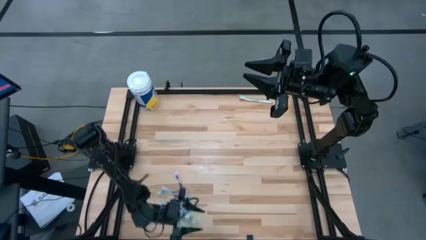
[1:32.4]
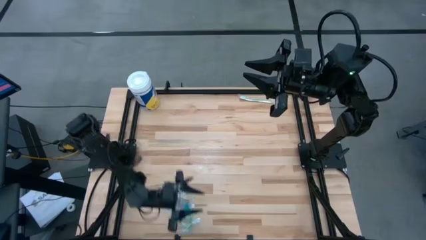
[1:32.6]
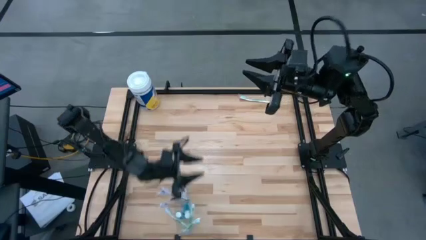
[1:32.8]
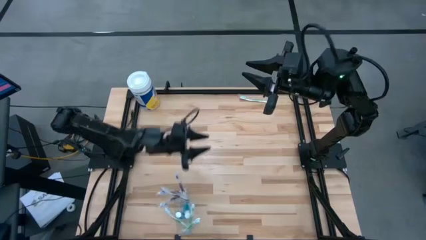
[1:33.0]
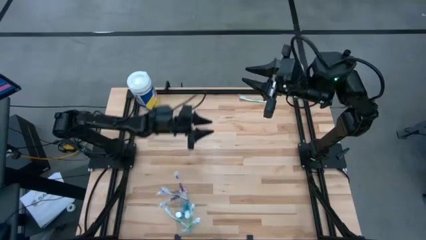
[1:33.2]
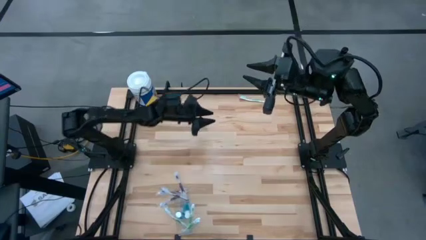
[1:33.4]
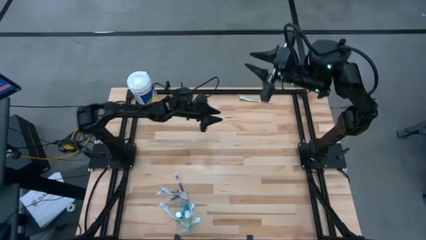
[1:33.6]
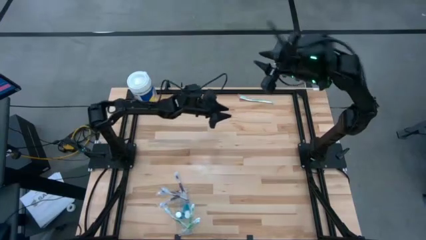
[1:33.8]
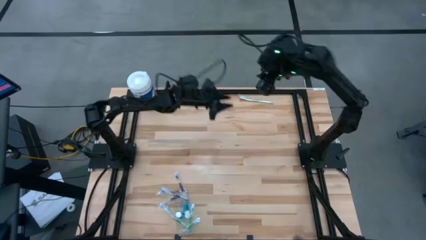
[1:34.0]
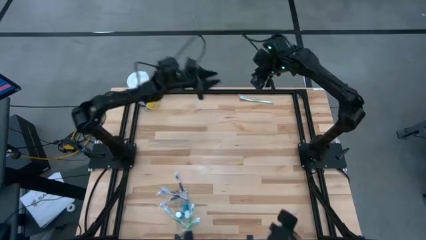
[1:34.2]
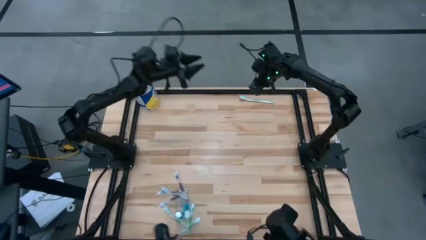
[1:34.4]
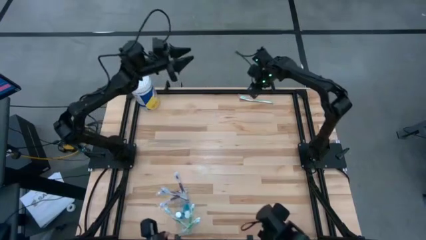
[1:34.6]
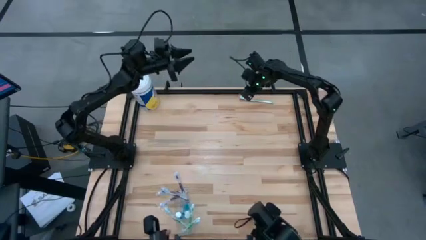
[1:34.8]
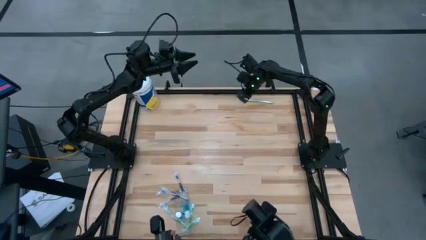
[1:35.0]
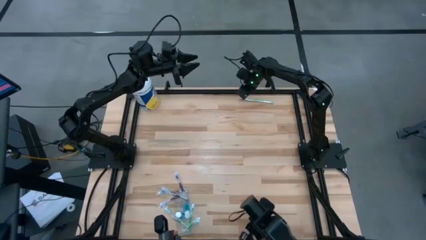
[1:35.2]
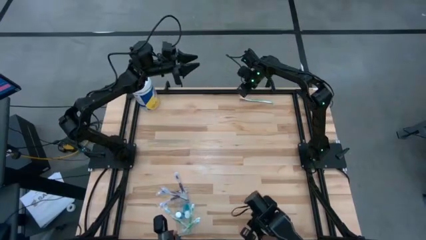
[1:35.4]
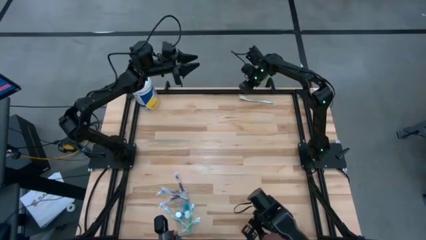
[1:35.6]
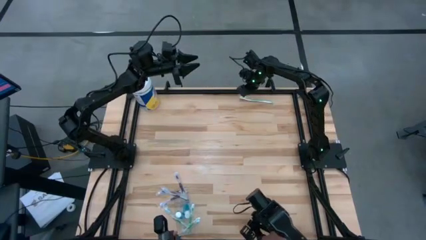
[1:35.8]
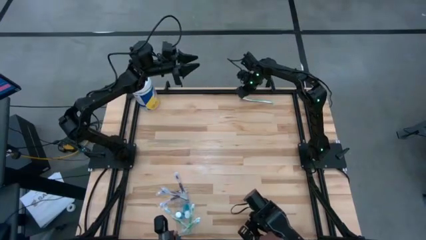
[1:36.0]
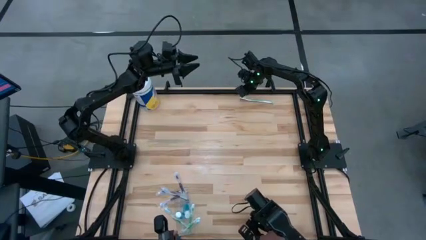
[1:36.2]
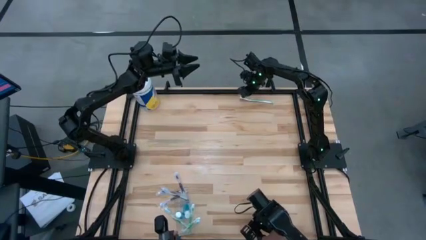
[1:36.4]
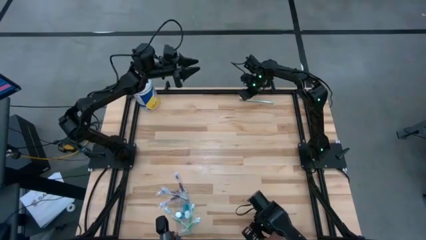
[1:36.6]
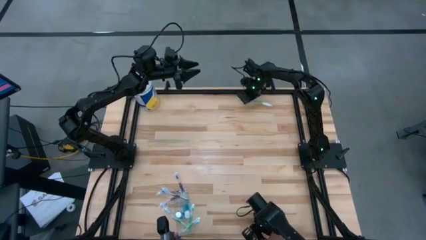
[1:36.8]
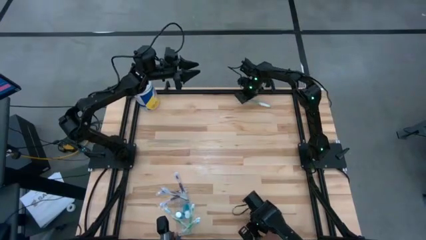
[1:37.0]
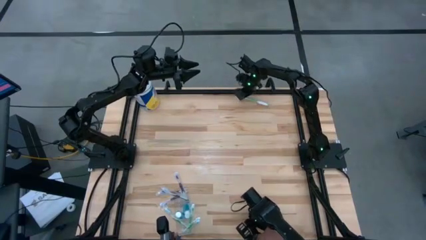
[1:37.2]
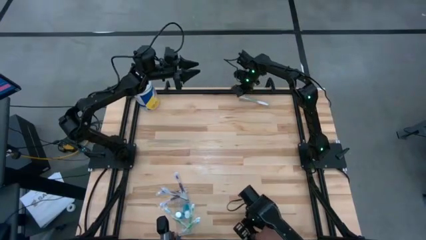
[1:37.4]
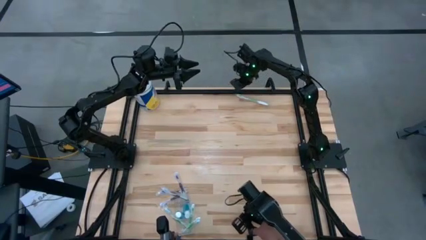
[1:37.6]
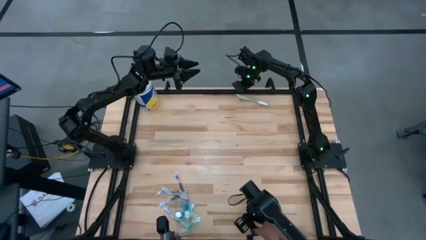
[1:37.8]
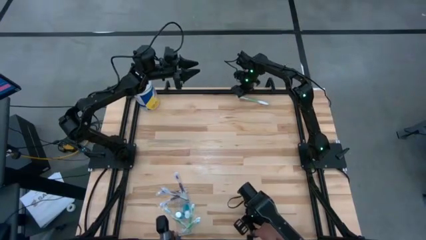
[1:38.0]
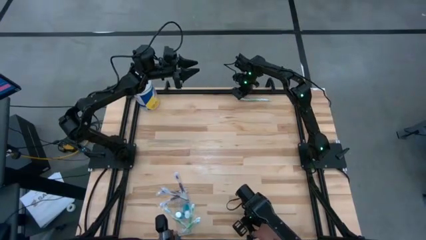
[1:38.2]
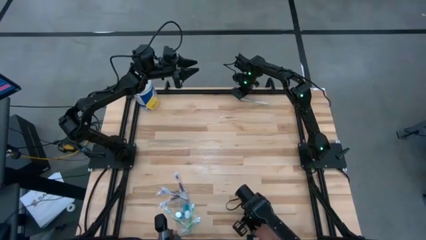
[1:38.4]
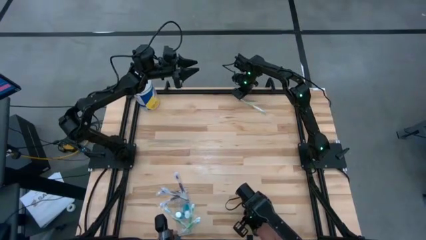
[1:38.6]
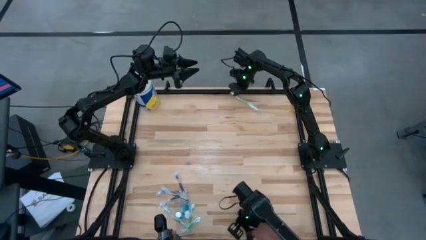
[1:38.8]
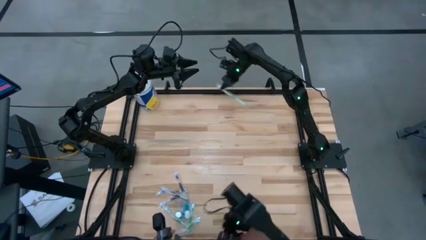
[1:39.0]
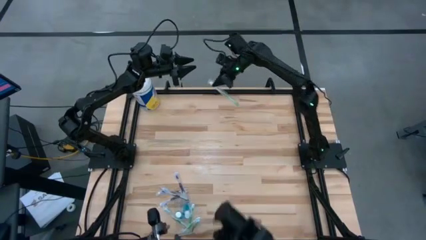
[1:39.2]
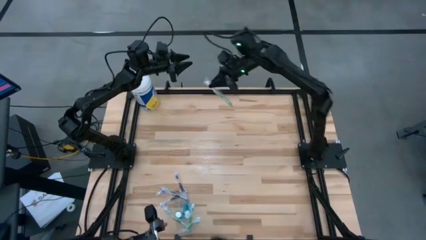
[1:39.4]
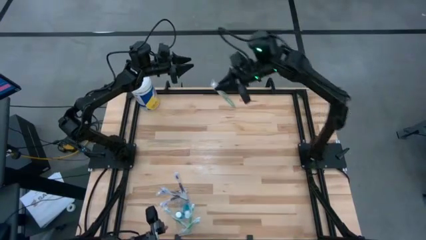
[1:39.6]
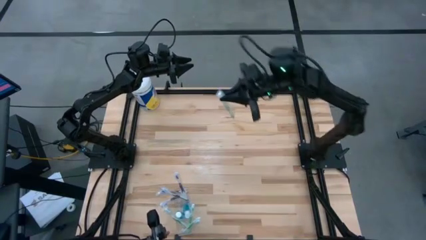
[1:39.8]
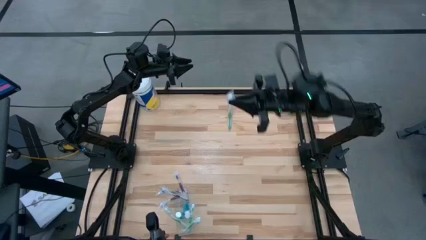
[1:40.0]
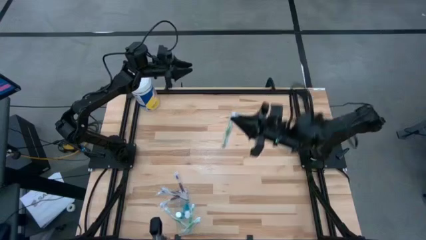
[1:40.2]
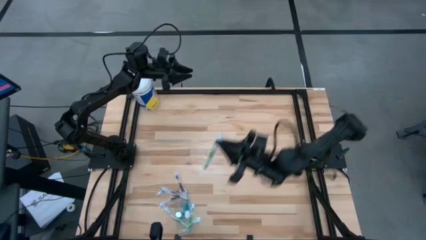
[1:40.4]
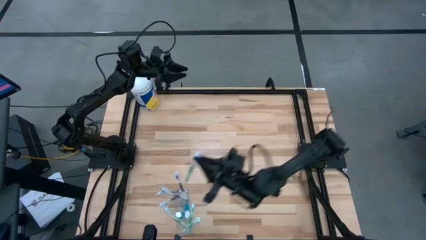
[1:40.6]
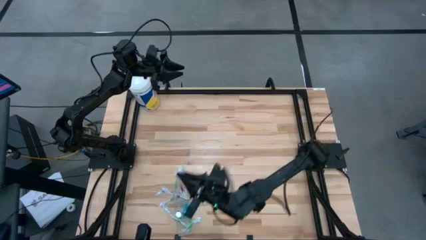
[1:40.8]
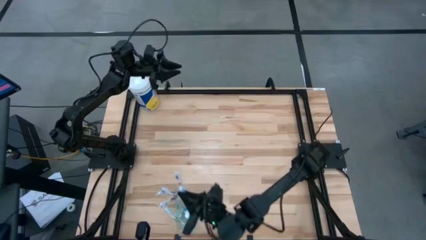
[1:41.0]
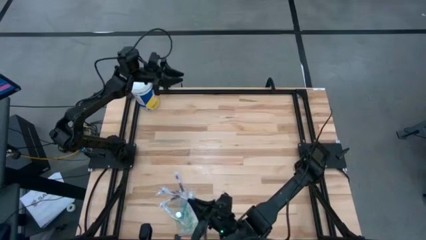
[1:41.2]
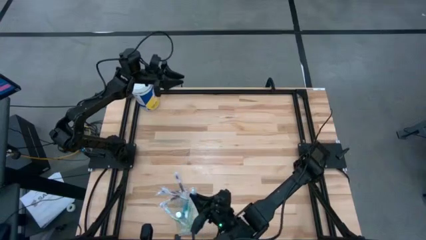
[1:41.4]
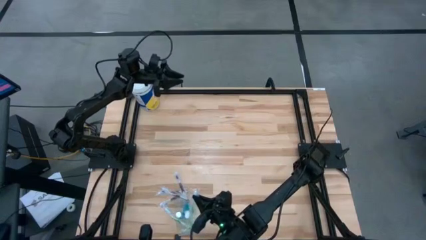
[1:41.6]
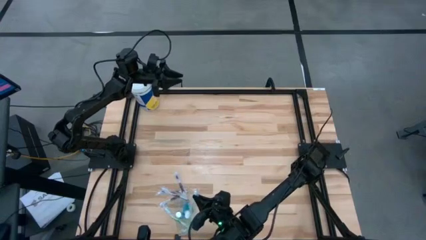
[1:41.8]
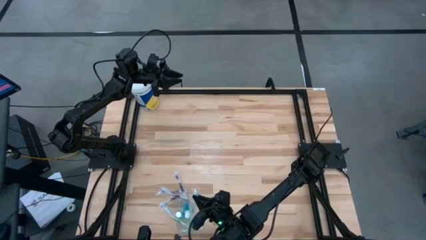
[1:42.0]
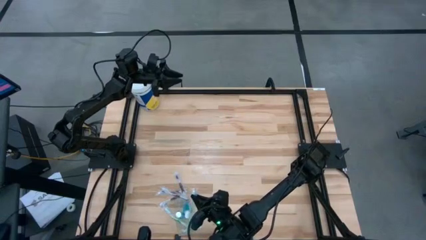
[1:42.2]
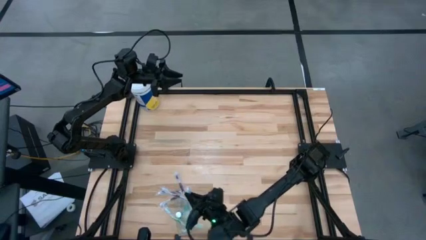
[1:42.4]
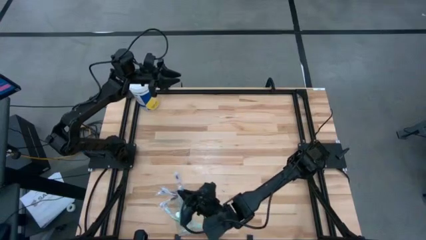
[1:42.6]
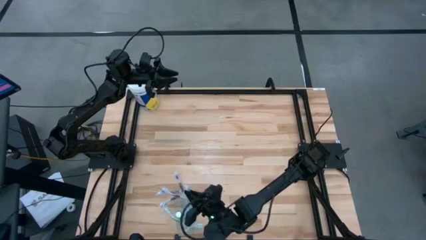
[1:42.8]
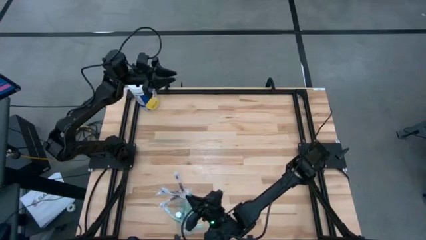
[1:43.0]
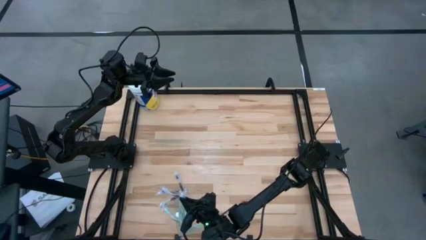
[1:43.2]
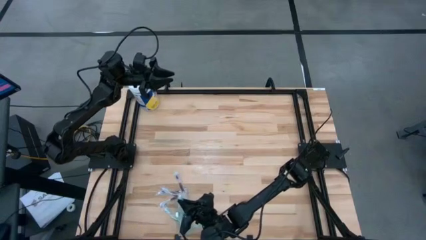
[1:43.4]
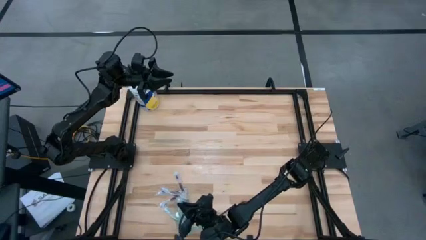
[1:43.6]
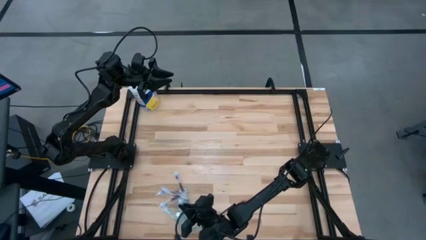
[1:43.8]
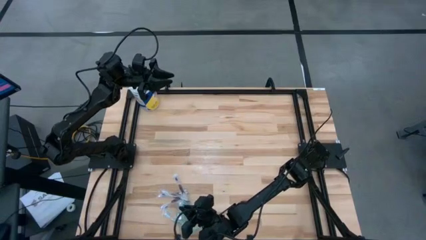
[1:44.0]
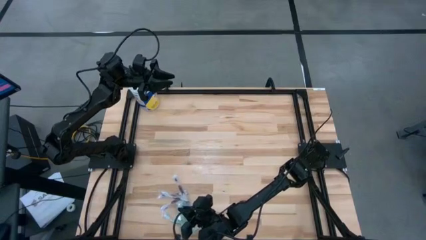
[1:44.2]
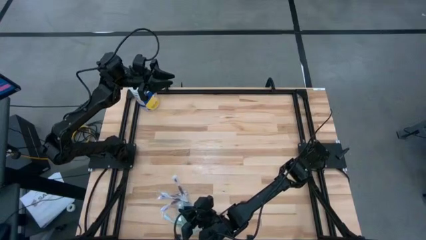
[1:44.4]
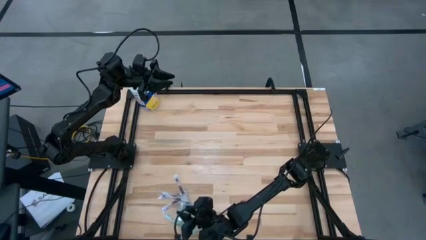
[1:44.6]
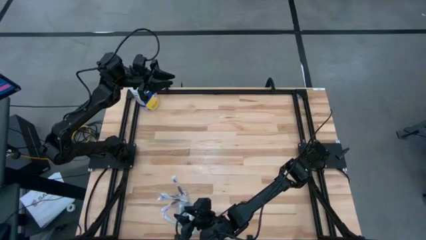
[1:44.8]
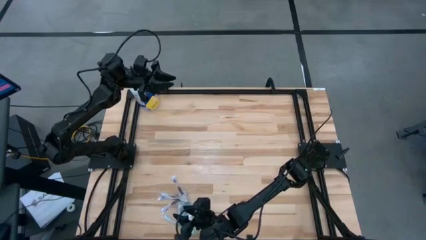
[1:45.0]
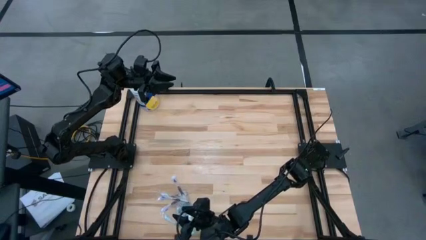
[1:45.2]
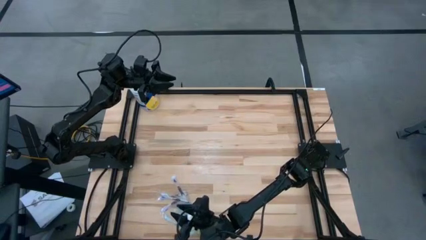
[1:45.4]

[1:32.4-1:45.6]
Task: Pick & Place toothbrushing station
Put the green toothbrush into the transparent organizer

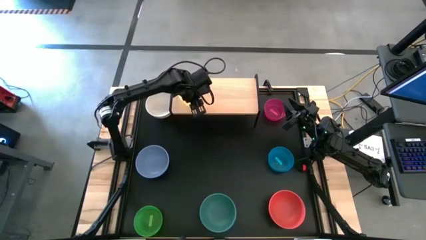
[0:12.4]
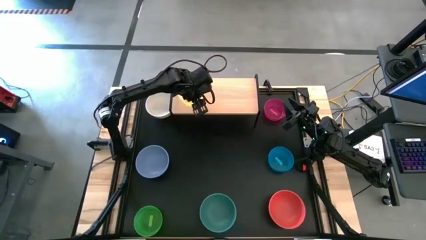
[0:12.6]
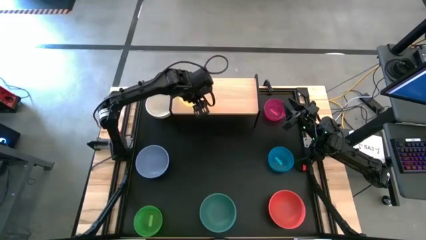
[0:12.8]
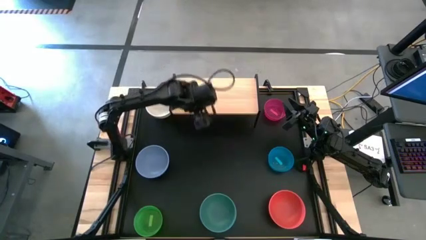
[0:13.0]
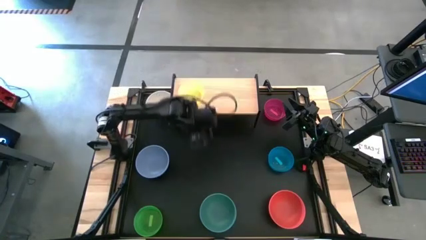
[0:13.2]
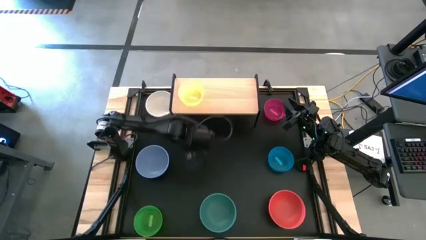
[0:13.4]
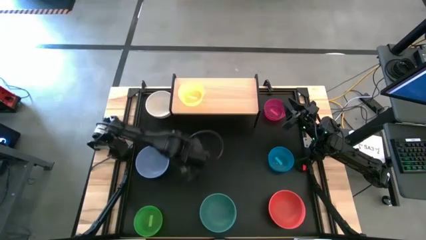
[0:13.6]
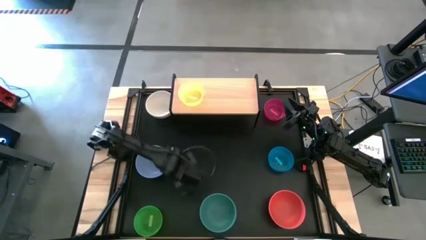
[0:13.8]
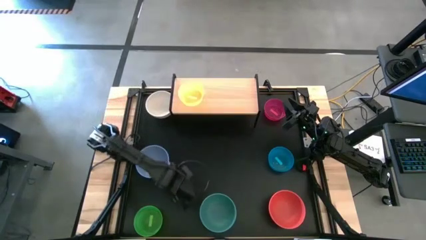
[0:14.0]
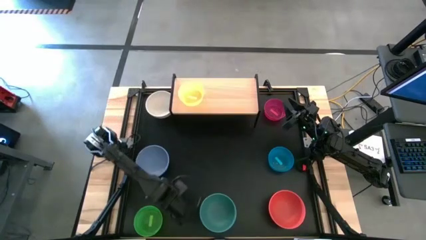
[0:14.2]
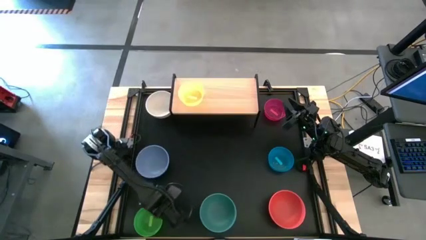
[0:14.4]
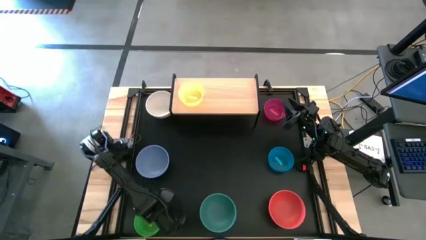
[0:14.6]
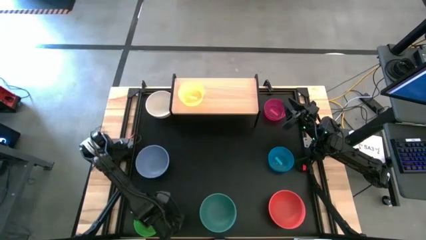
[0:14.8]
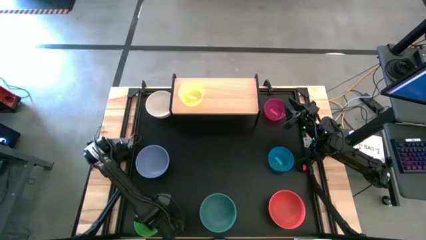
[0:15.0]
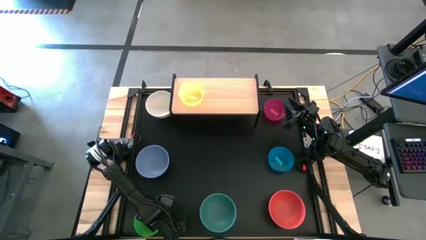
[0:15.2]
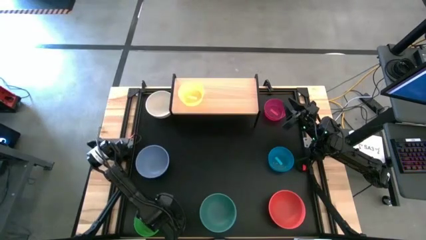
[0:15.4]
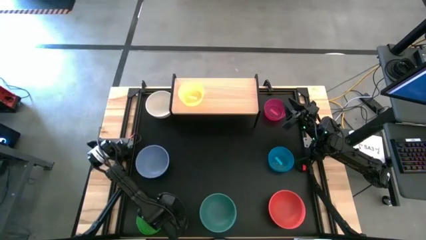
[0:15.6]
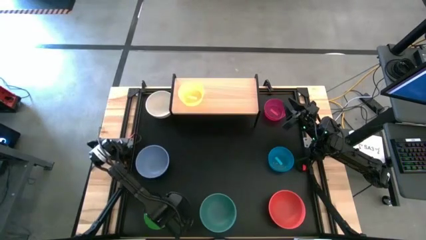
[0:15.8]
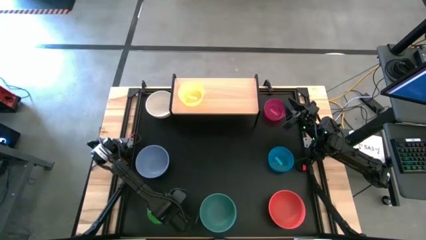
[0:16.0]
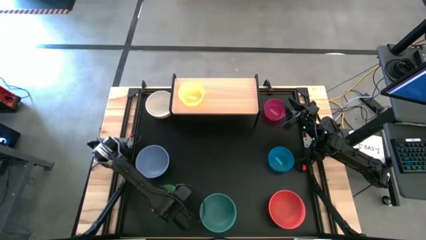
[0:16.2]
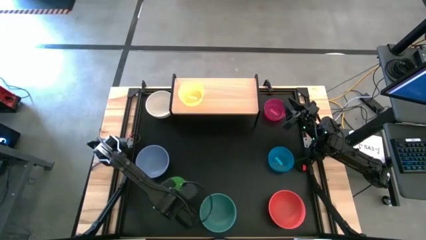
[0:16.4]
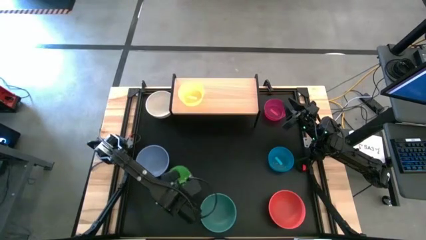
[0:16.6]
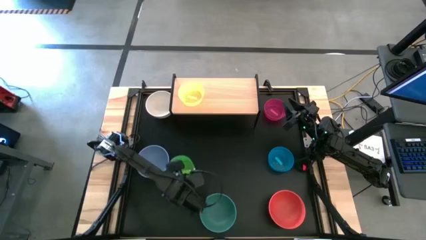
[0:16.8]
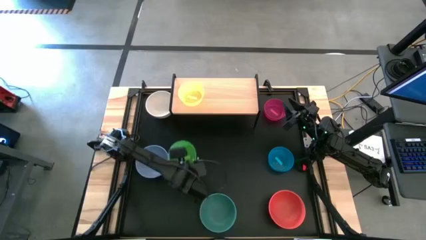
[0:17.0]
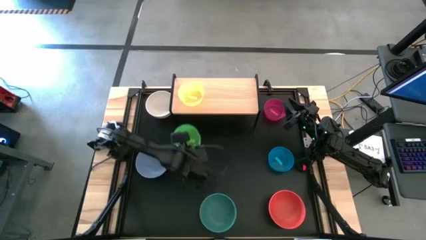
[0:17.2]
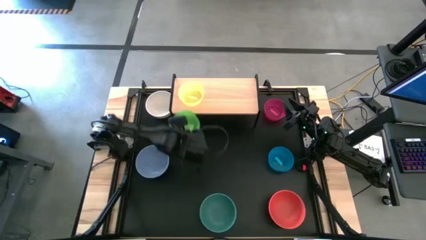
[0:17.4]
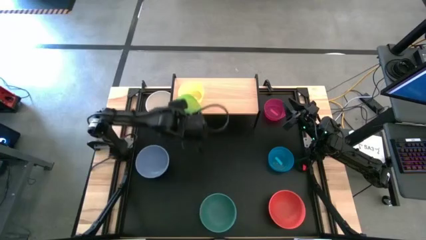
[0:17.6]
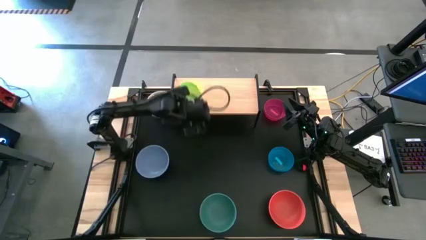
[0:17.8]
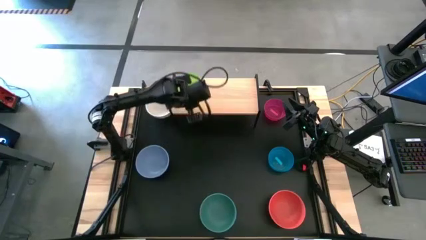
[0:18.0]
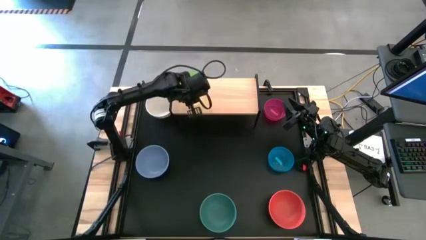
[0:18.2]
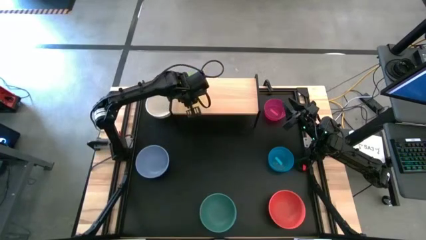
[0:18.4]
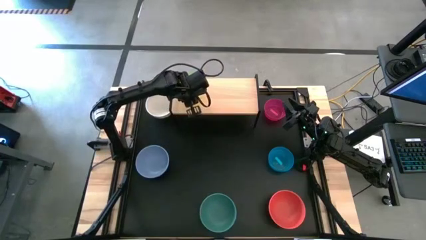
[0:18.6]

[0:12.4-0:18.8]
Task: Place and stack bowls onto a shelf
Stack the small green bowl on top of the small yellow bowl on the shelf
